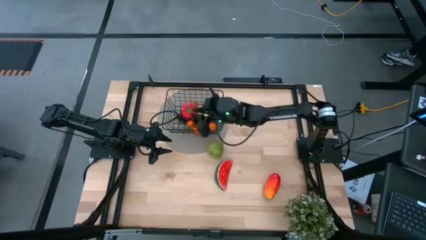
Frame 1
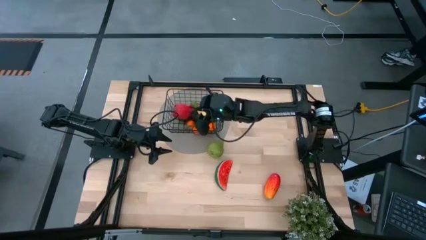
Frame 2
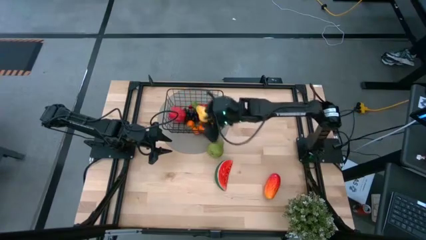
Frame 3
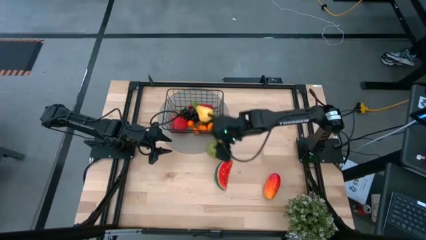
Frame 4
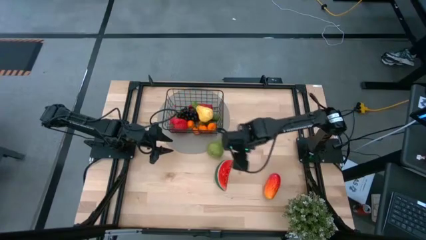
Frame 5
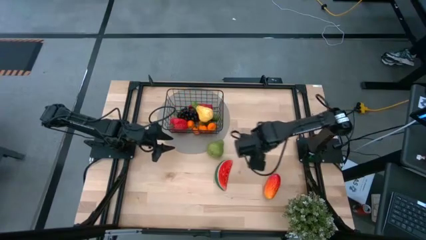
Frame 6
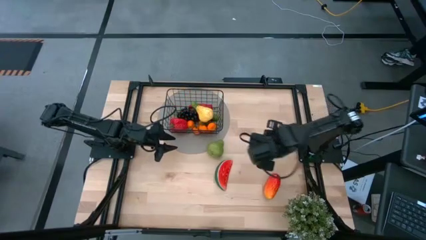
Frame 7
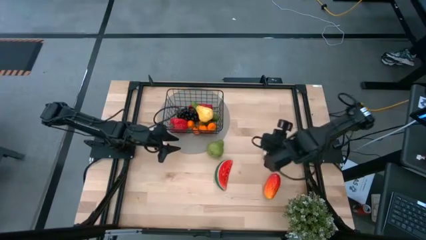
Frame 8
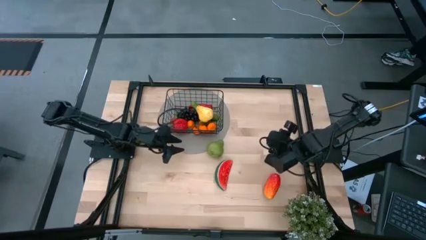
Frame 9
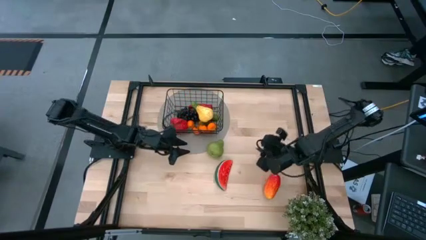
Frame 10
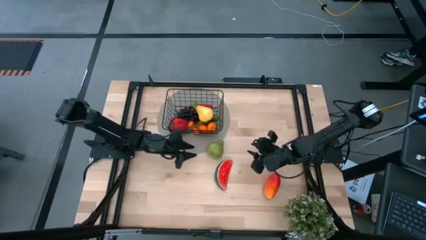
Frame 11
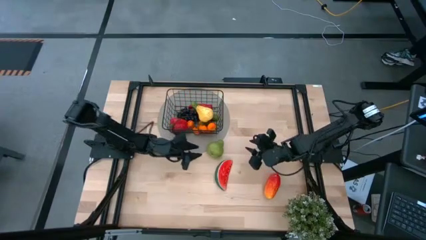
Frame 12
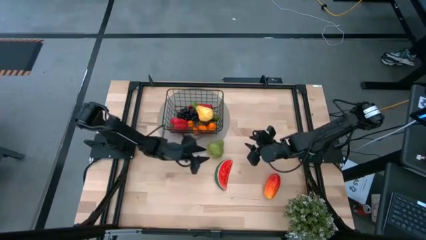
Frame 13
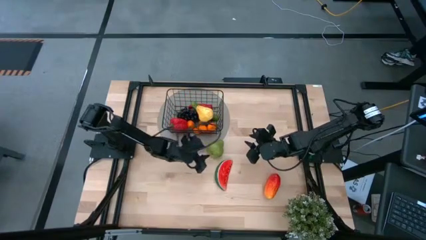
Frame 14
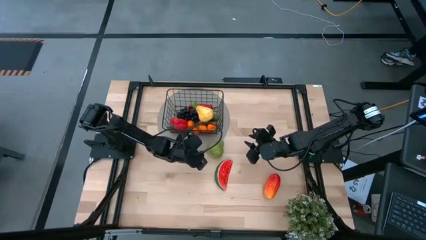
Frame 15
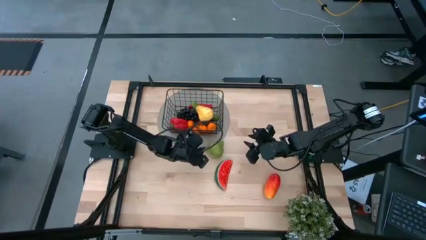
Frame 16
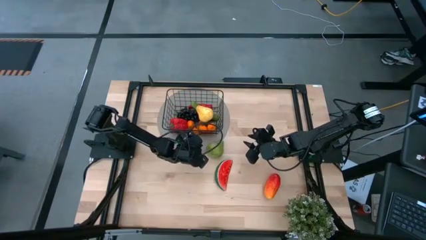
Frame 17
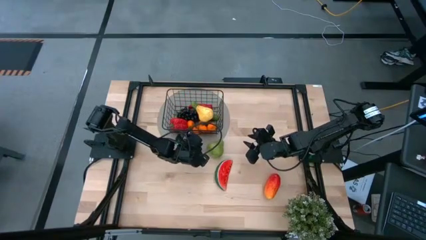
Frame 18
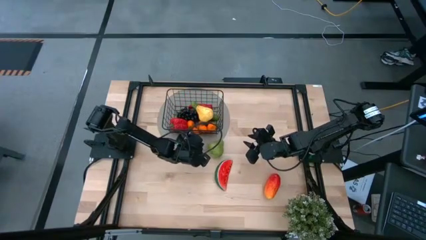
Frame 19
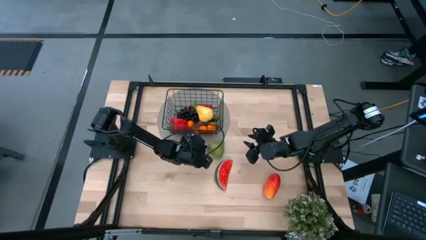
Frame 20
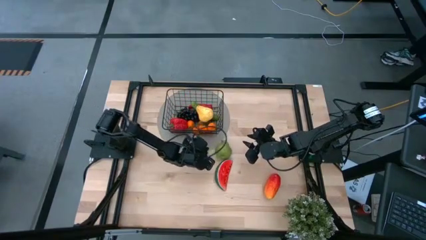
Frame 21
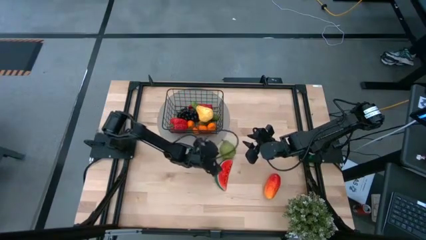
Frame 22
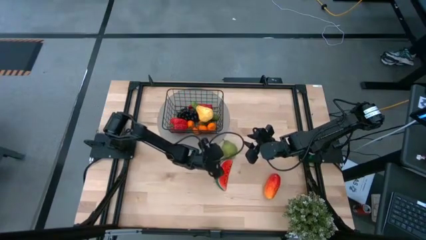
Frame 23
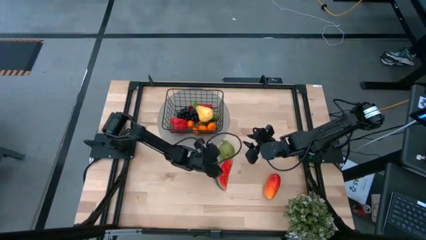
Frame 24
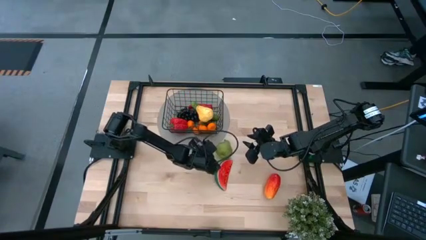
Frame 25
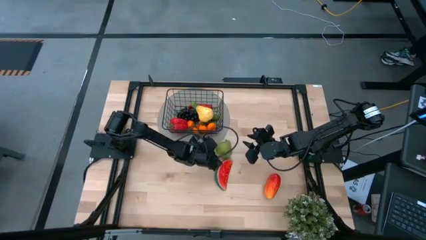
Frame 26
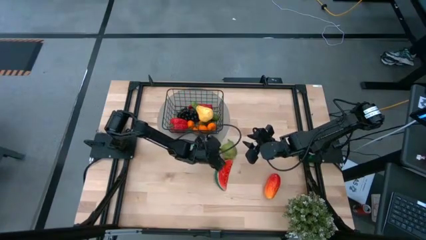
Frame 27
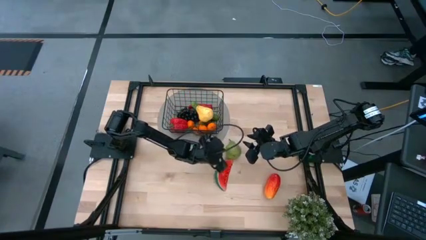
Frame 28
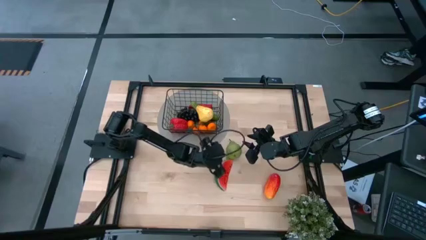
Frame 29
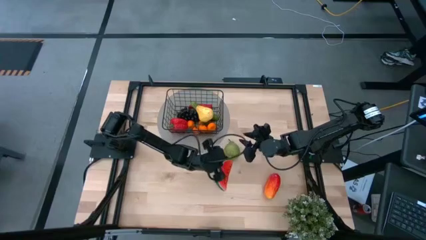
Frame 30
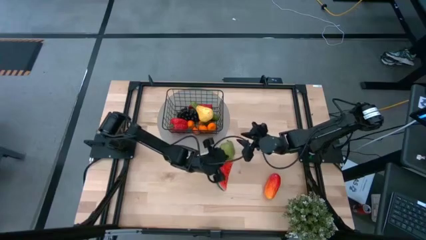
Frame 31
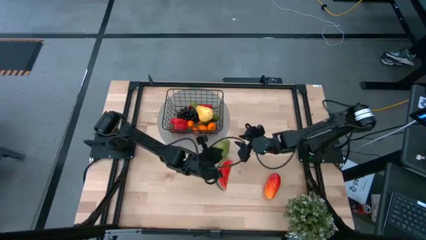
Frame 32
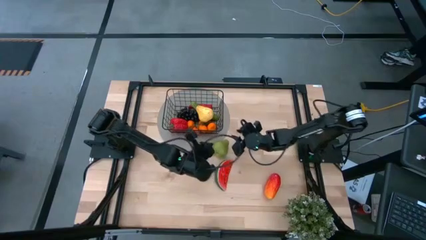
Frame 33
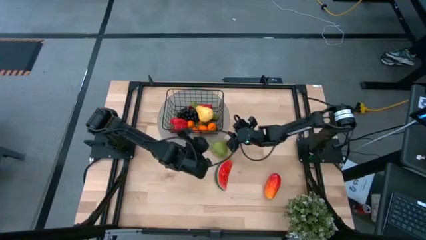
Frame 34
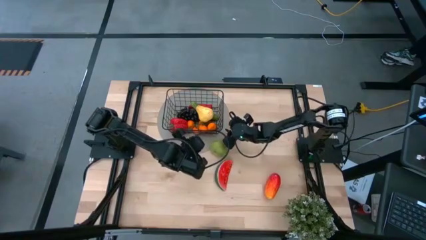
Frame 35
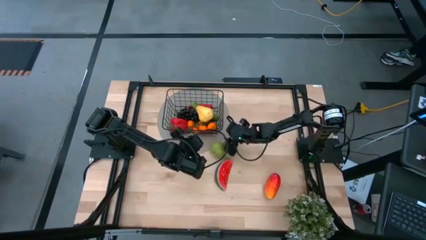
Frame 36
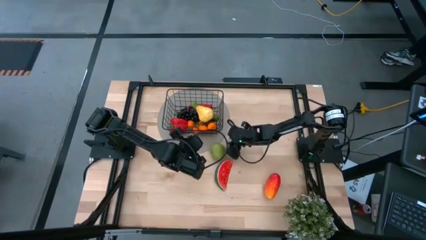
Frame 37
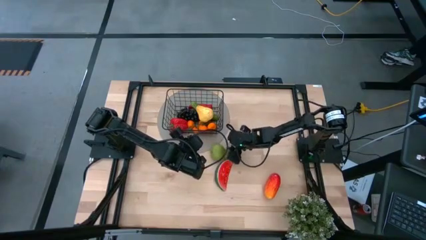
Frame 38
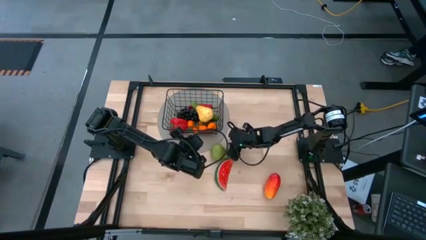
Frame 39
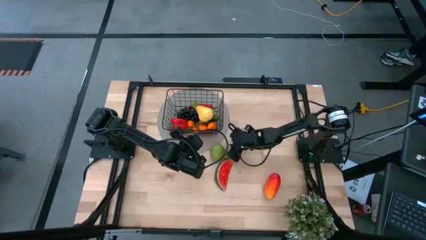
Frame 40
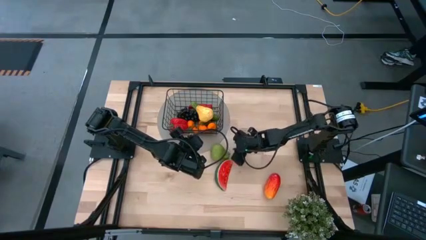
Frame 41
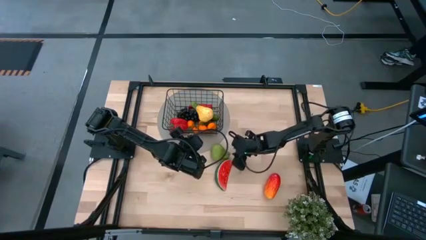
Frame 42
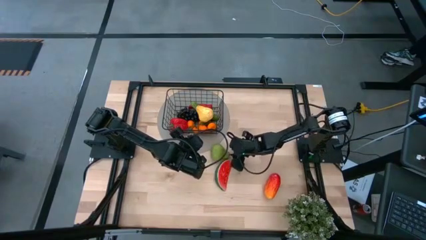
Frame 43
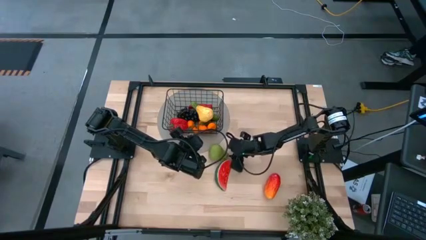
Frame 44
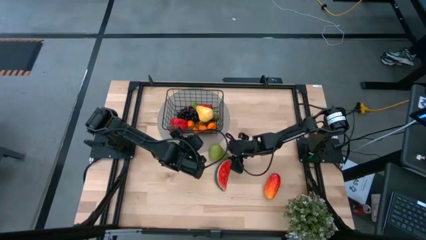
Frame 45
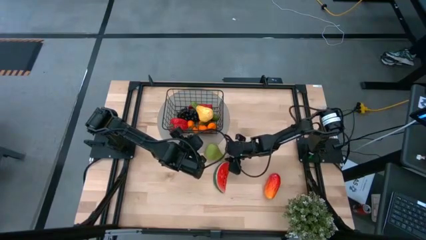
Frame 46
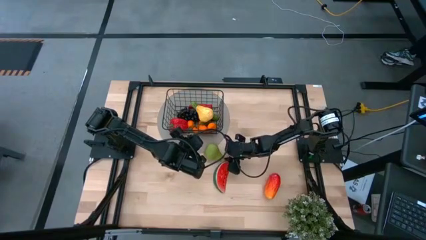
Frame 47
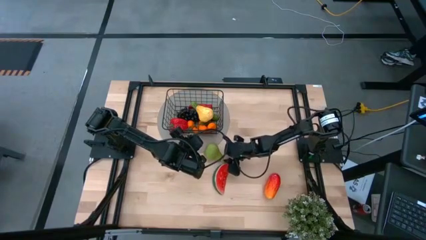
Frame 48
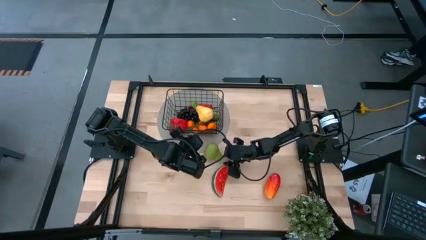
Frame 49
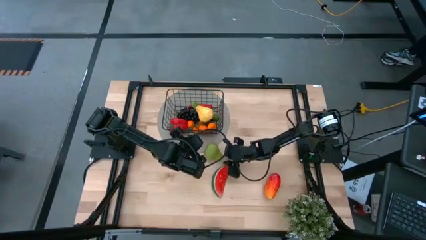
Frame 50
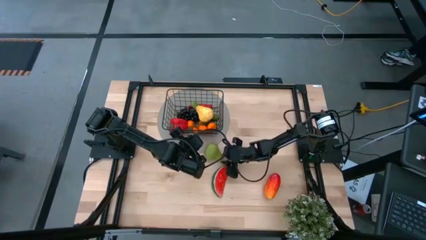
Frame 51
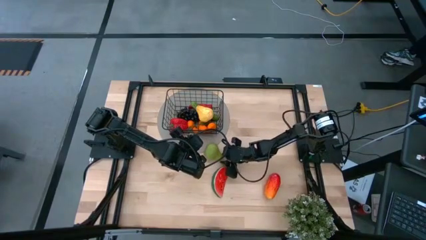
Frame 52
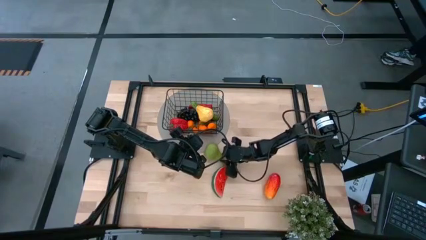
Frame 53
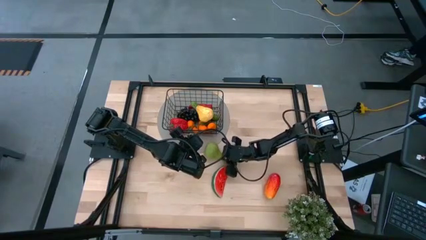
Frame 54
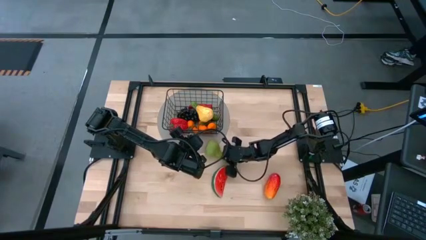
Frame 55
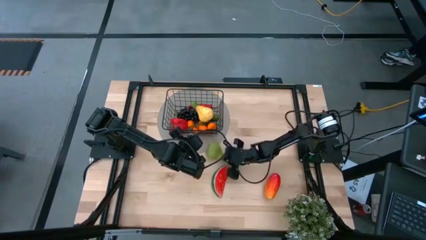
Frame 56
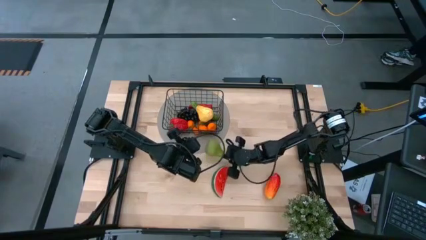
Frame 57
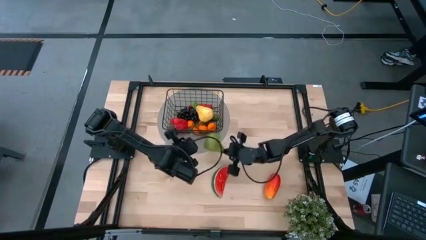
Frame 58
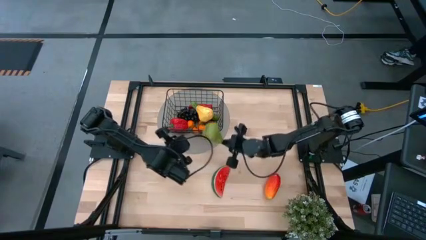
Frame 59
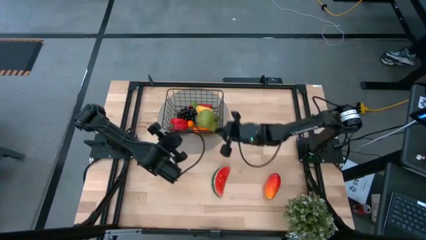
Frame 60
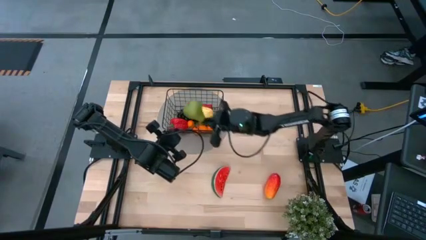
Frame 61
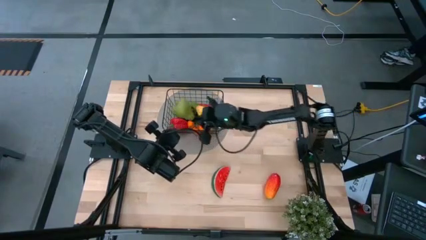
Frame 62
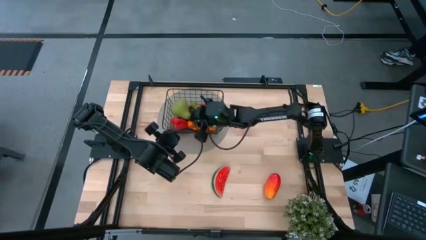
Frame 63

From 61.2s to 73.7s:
Task: Build produce basket
Put the green pear into the wire basket

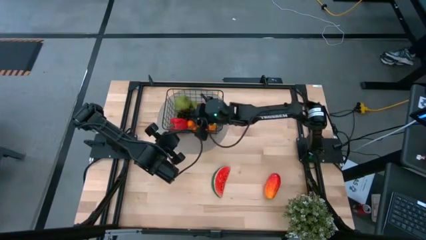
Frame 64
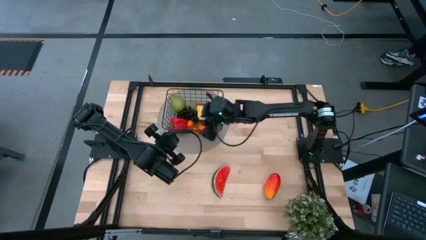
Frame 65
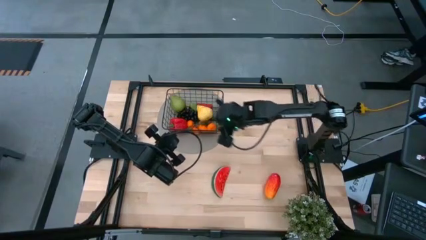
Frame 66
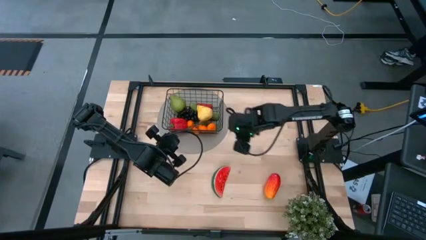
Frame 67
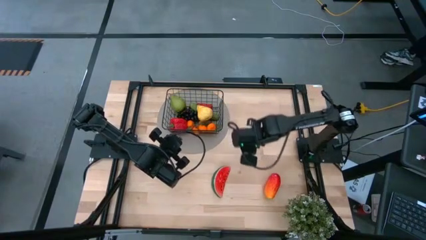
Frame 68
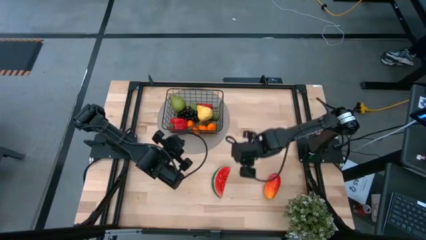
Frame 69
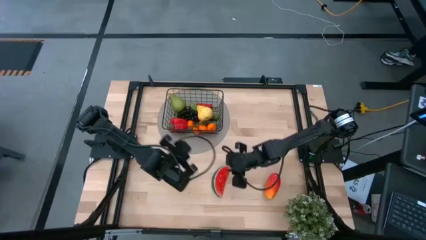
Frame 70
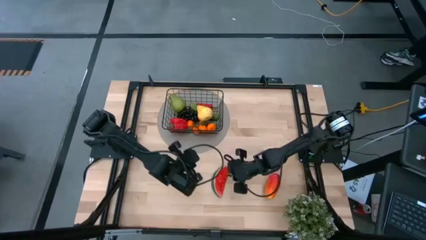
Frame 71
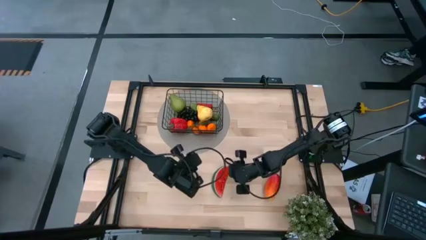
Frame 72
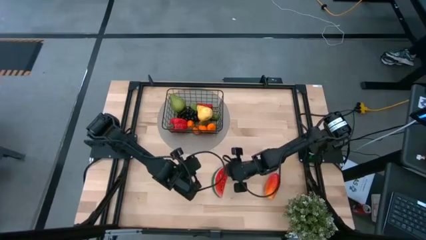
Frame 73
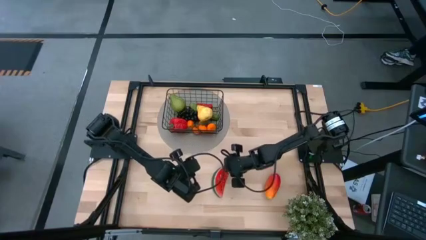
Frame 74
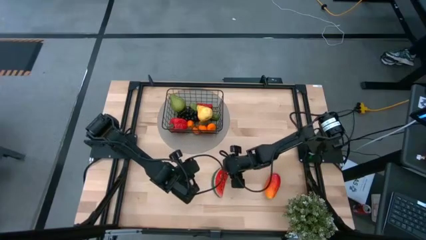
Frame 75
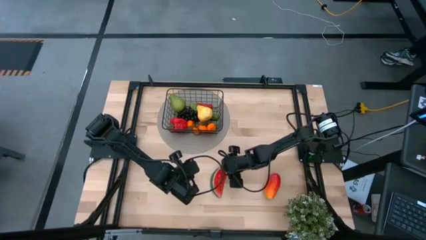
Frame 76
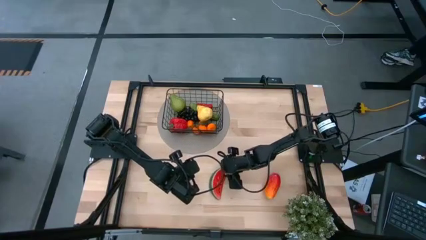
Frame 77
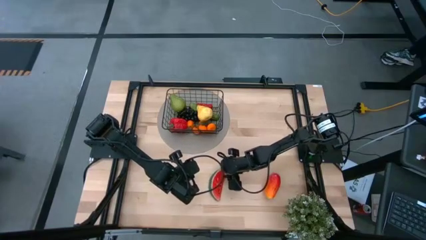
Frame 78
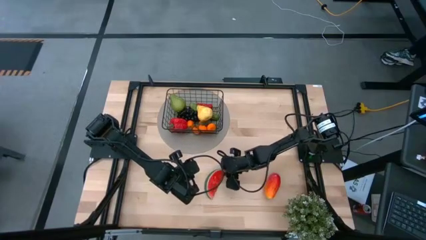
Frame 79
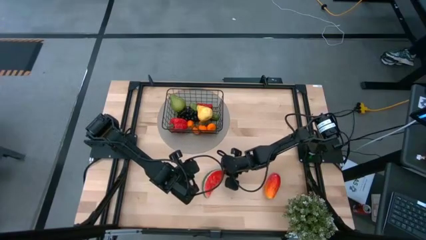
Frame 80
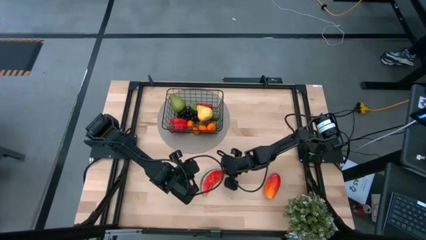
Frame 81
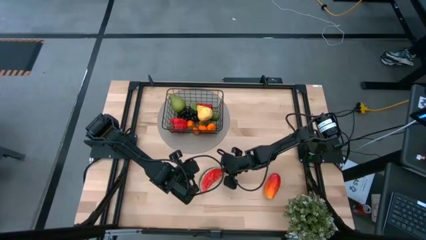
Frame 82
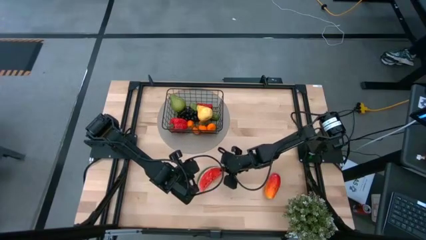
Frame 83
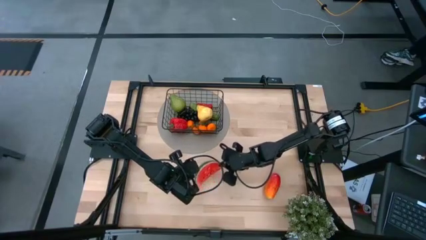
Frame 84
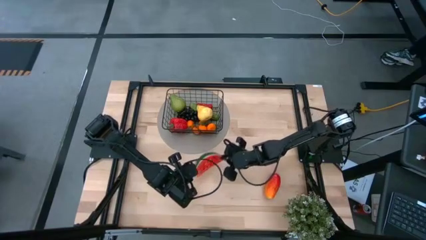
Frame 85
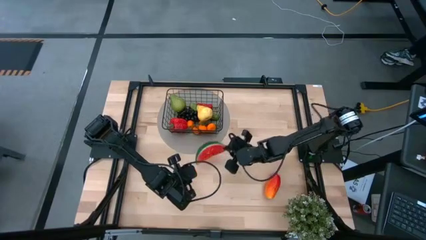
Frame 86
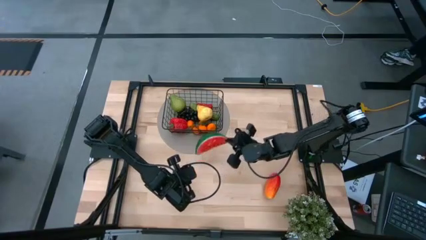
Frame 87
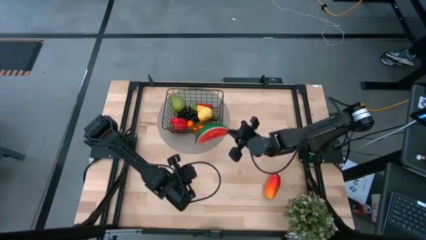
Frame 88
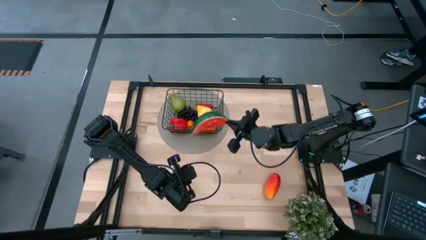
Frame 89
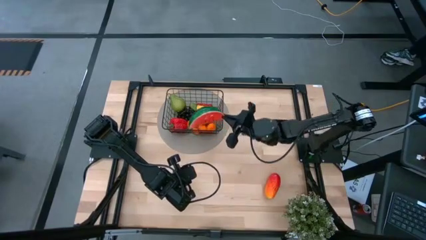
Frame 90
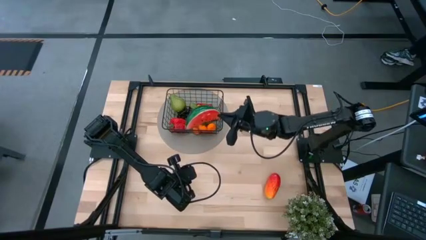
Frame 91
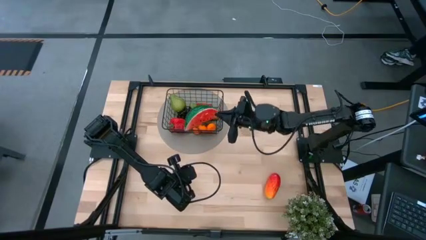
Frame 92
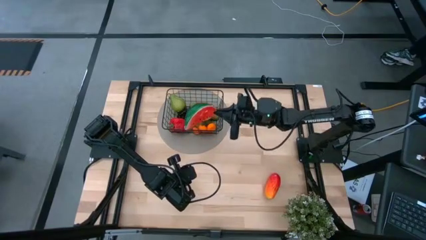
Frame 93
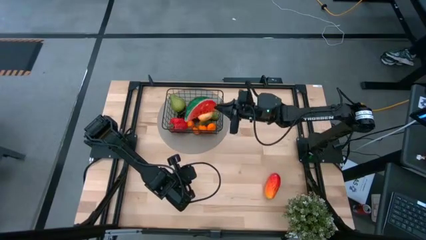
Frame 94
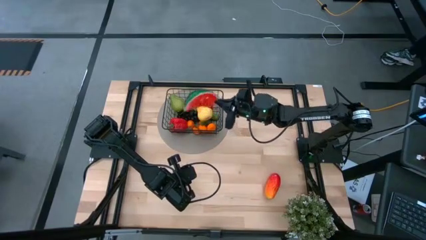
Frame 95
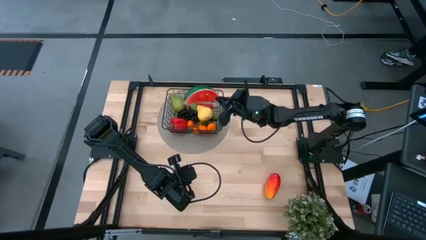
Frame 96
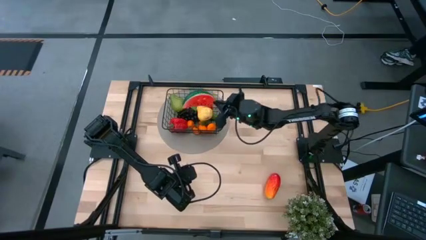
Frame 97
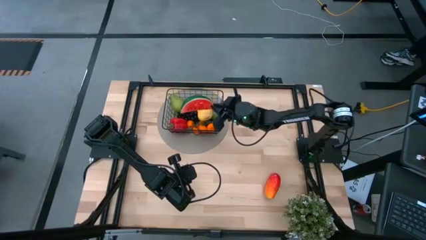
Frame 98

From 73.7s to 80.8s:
Put the green watermelon into the wire basket
